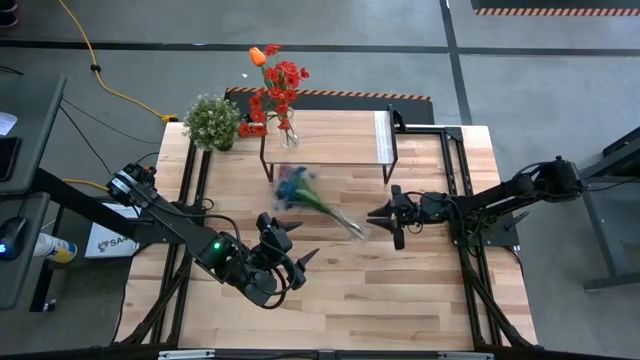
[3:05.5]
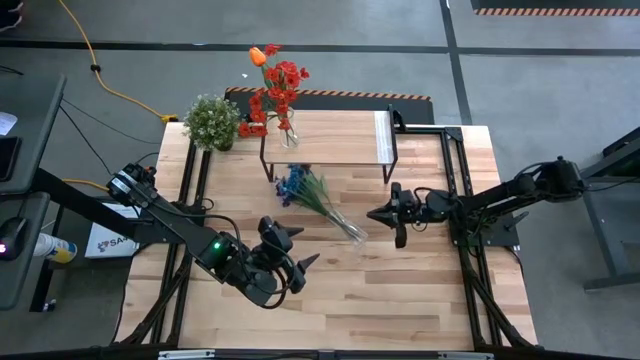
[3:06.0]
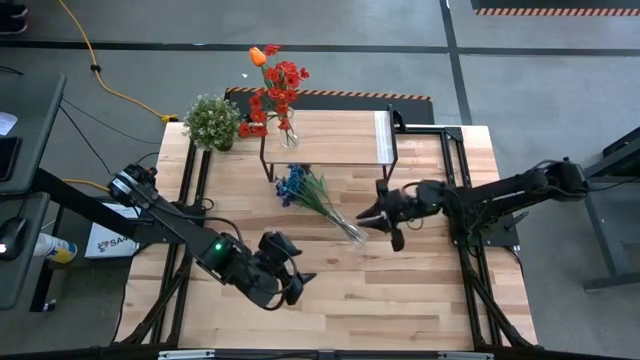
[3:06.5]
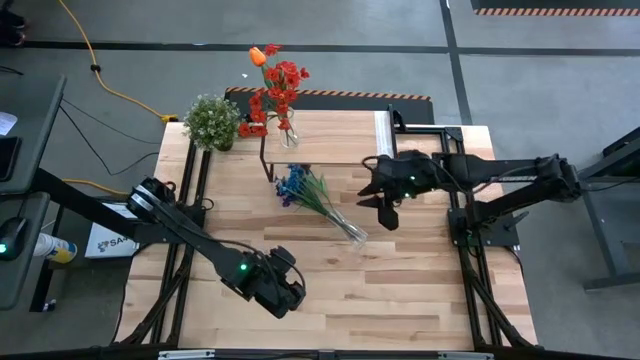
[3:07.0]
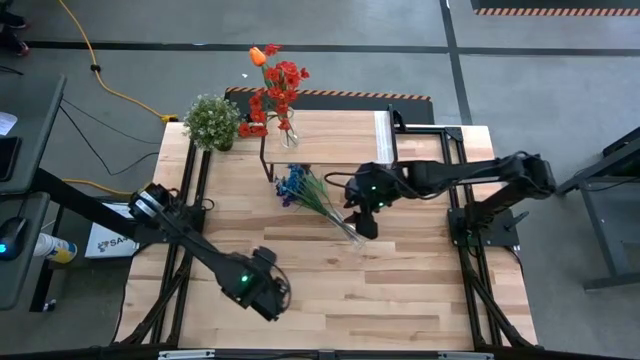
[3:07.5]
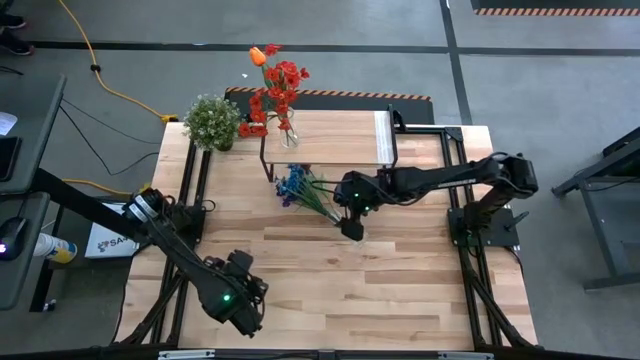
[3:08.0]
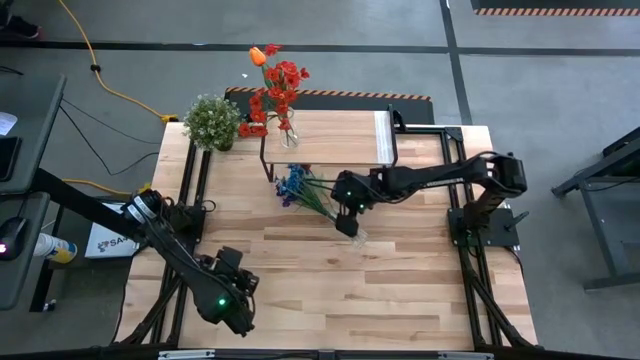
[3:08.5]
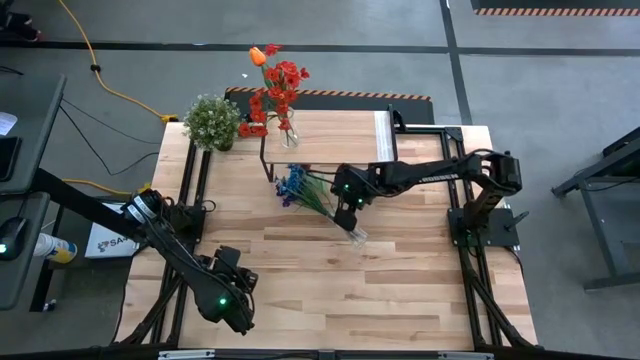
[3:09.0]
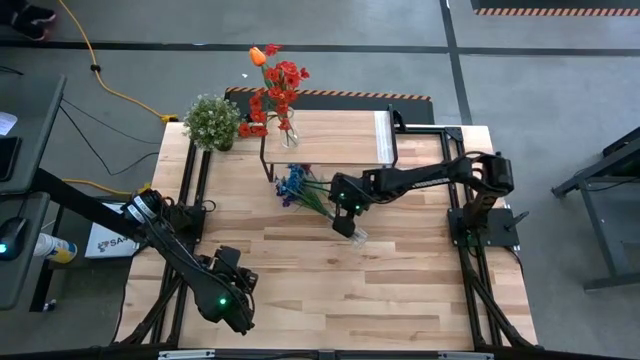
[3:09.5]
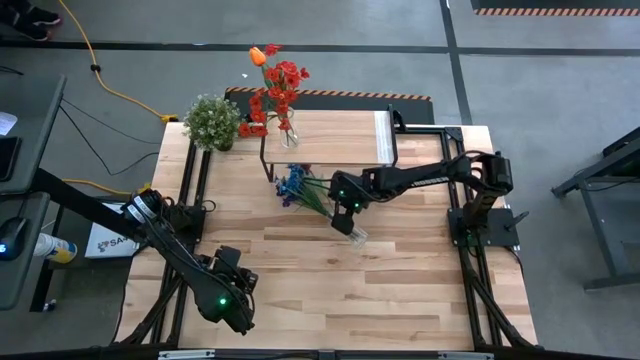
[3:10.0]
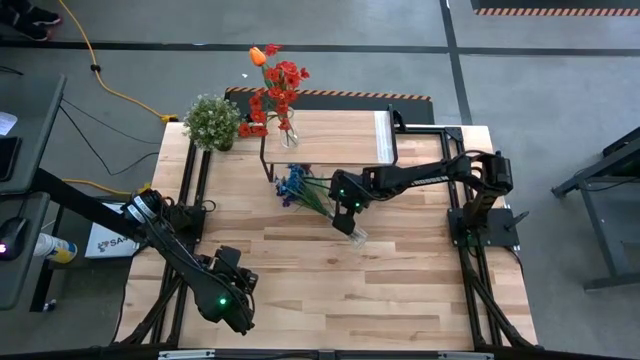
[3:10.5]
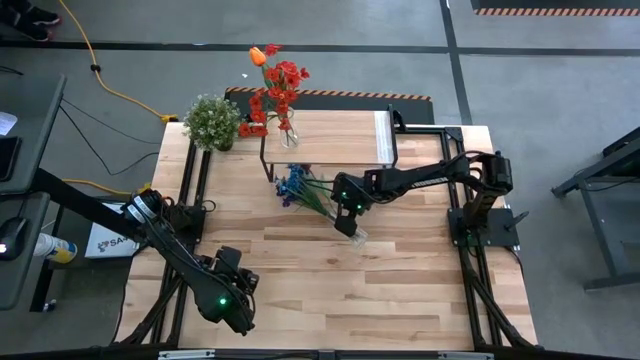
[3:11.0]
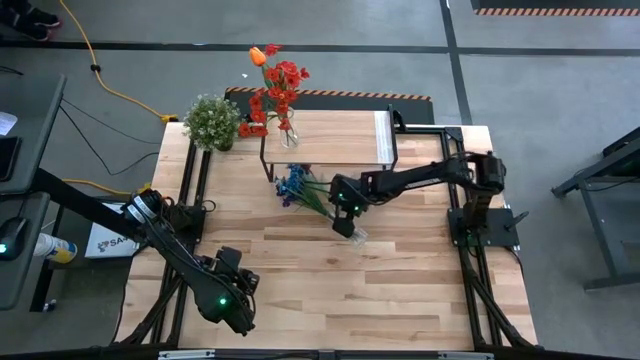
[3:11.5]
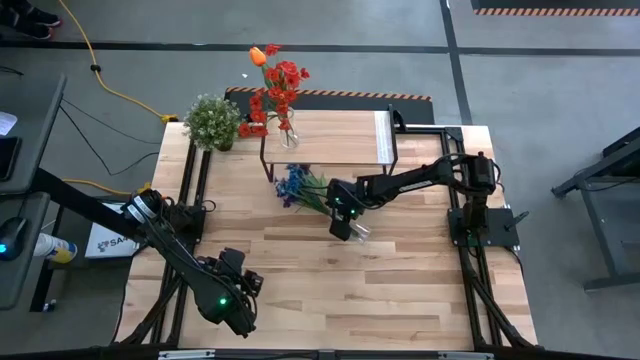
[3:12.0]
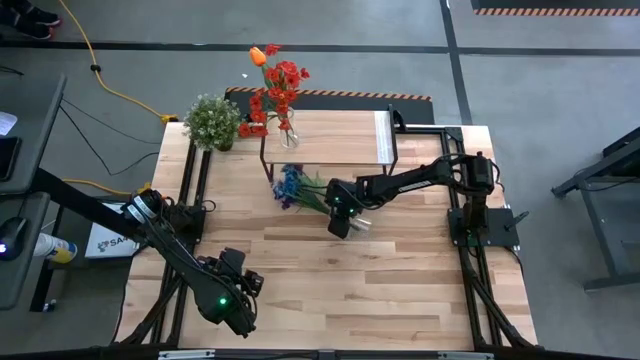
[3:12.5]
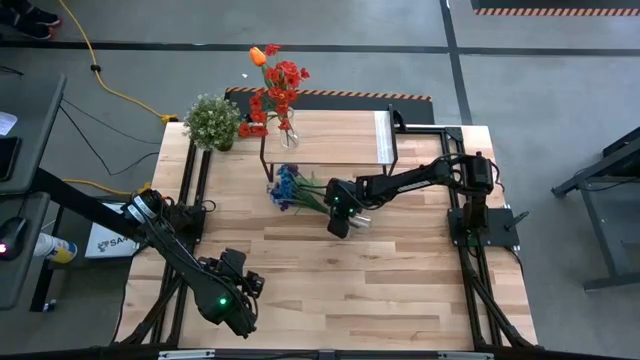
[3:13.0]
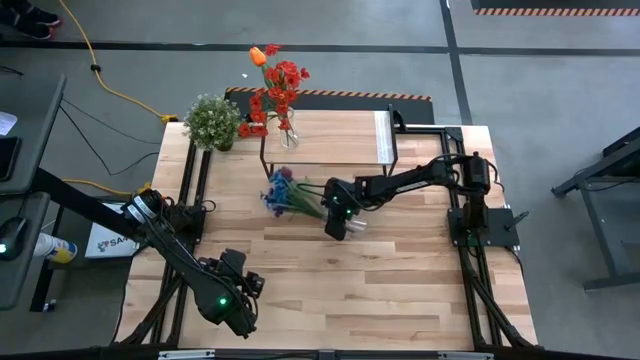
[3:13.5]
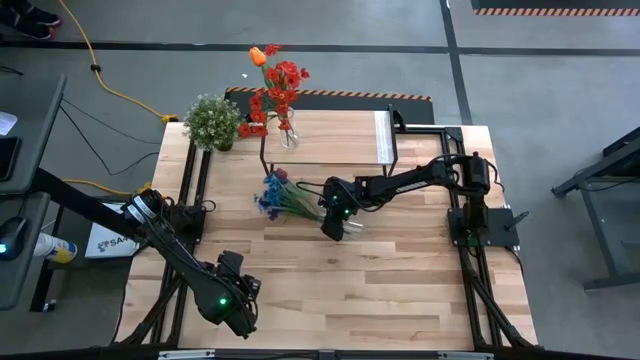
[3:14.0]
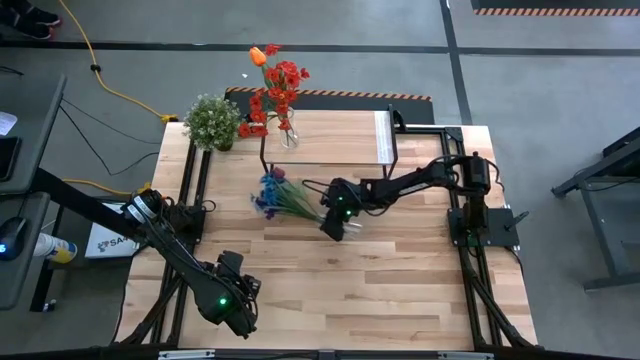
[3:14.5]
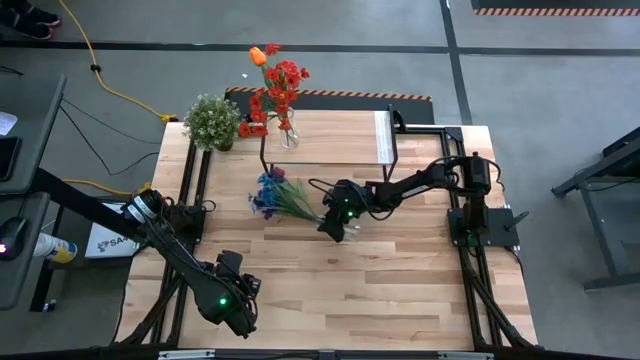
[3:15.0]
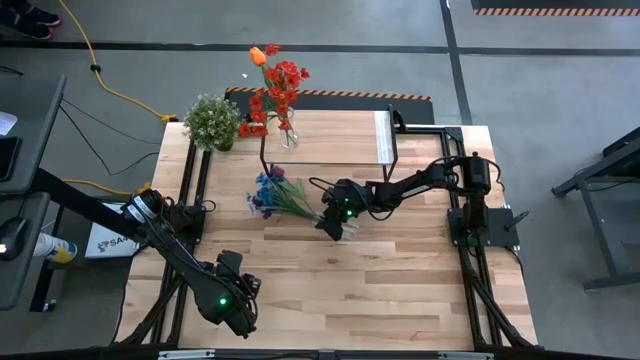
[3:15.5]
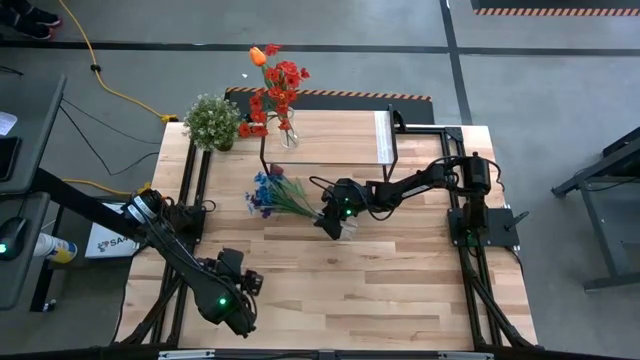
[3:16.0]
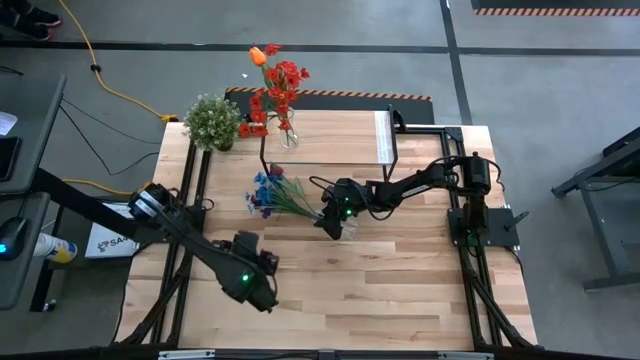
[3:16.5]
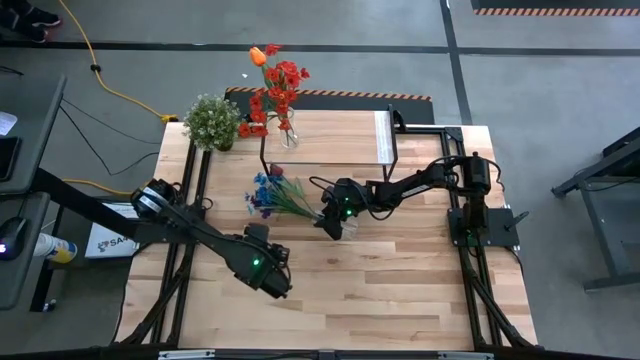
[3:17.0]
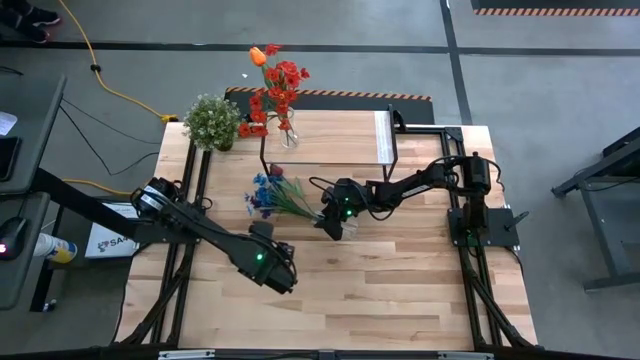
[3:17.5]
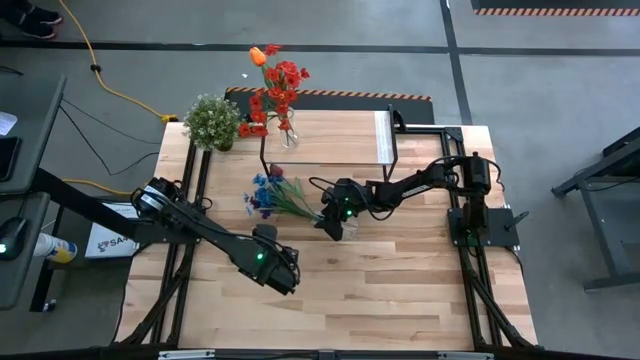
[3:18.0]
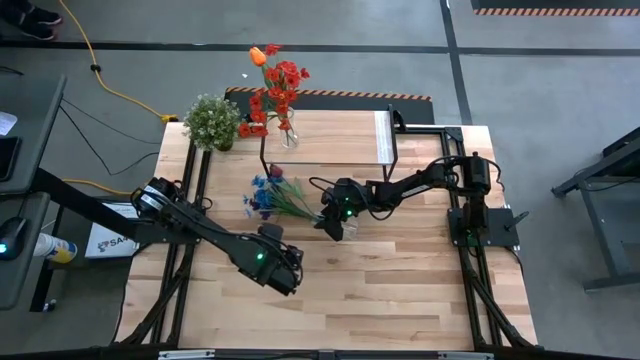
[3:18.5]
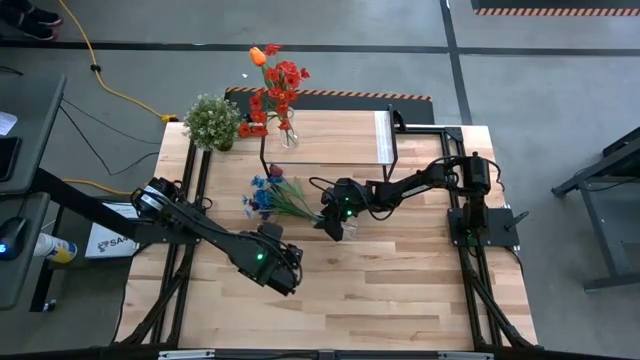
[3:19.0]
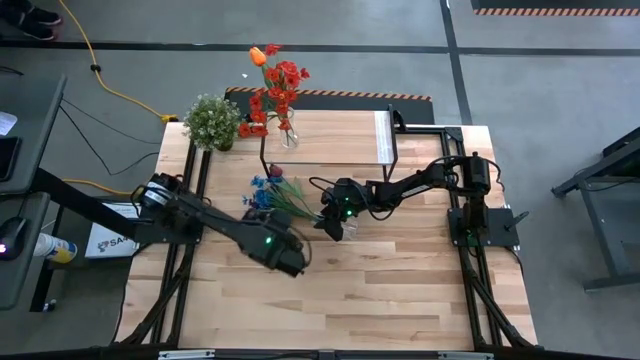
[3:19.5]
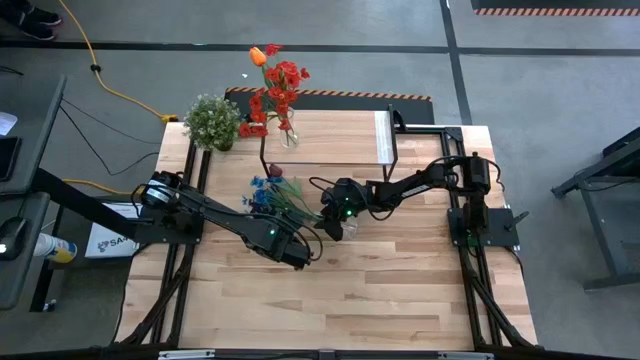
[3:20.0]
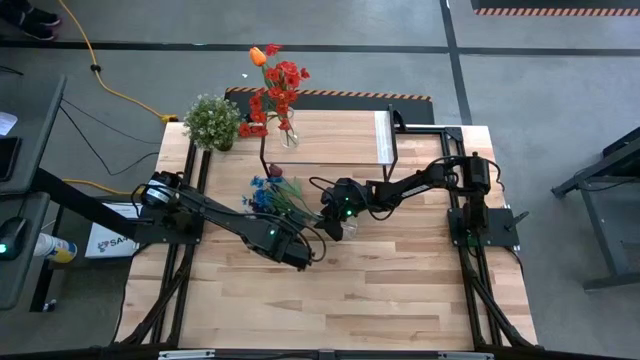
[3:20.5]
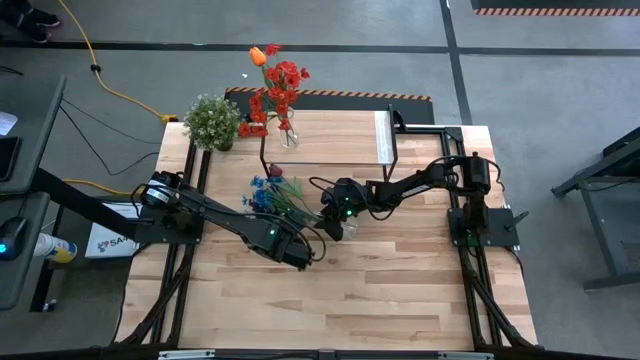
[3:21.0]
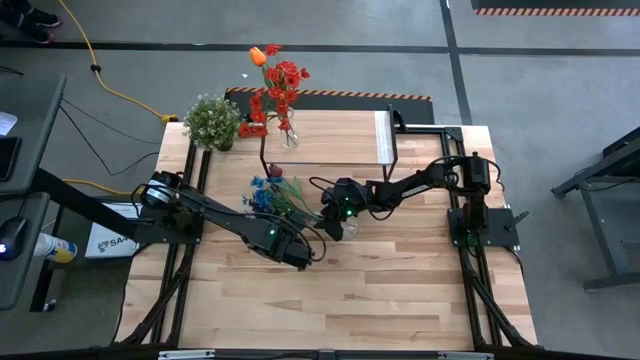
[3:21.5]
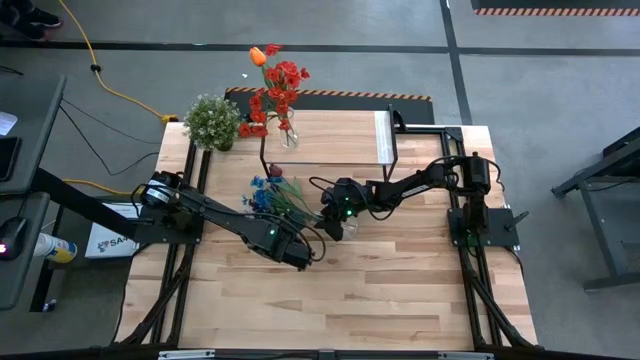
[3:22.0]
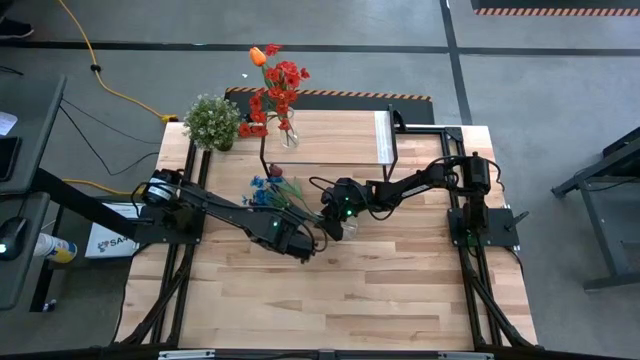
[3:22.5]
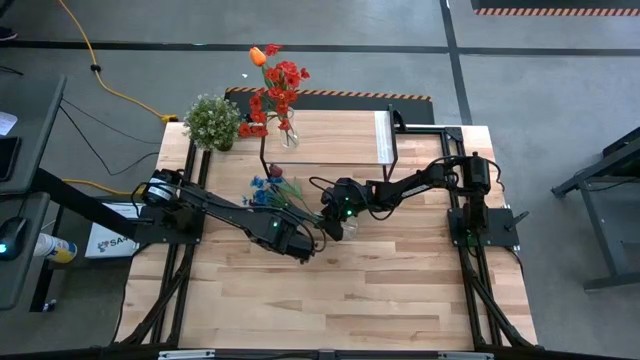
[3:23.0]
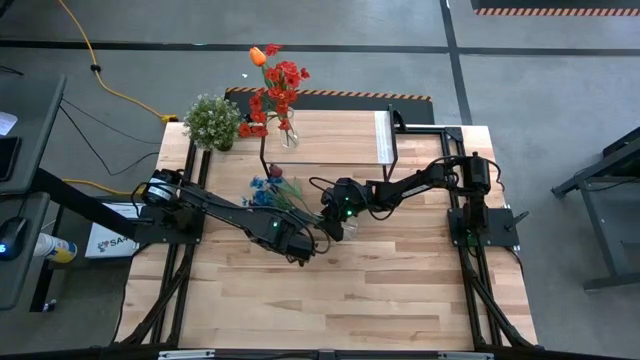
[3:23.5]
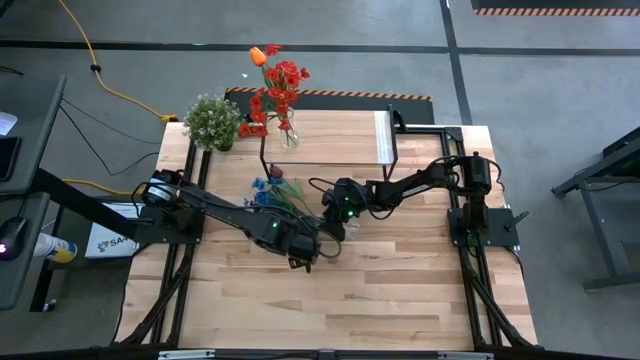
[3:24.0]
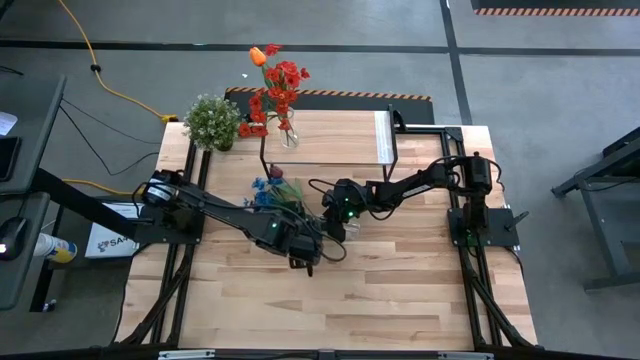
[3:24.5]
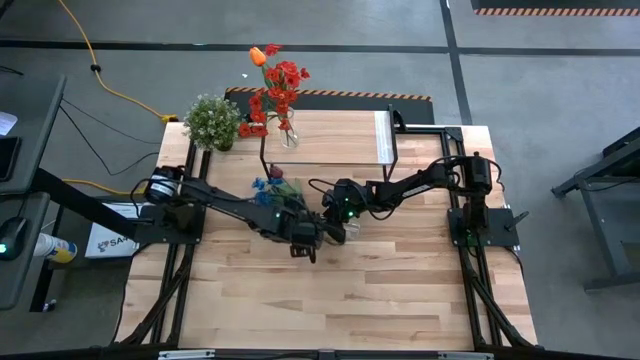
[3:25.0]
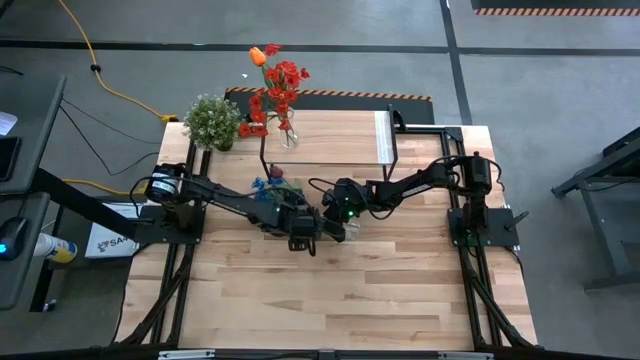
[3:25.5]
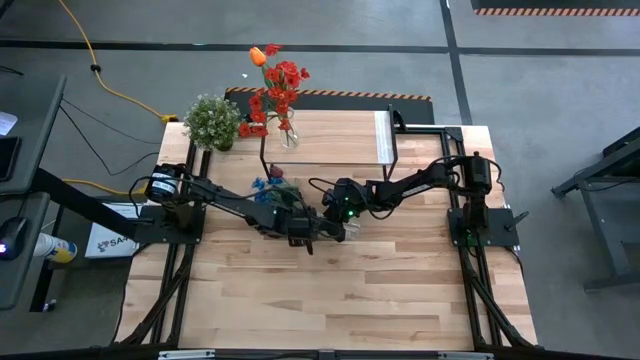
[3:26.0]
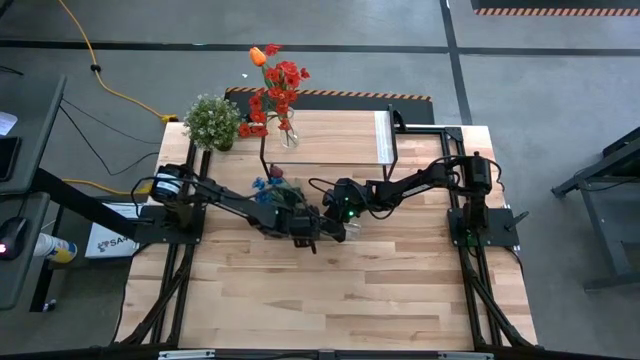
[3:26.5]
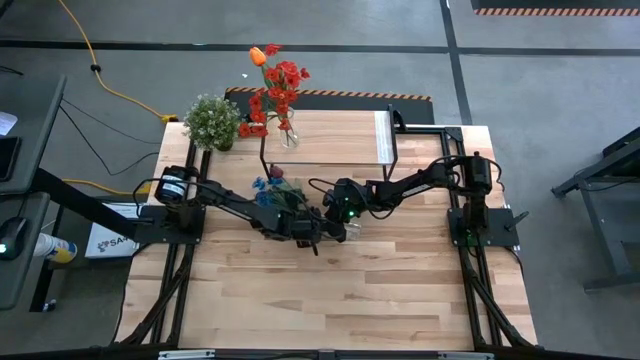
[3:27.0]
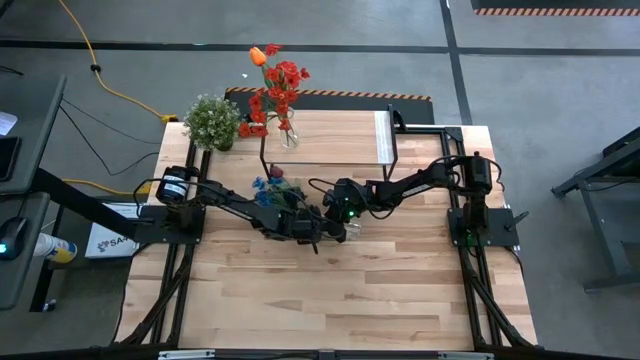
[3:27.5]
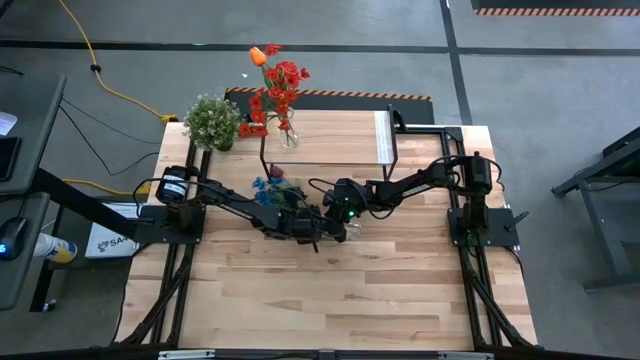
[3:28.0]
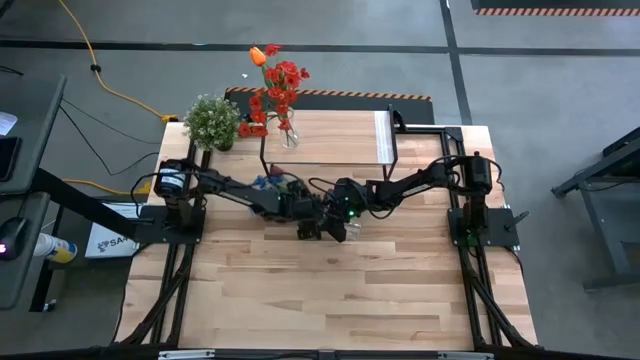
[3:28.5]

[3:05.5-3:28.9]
Task: Pick and place flowers into a vace then onto a shelf
Put the right transparent vase on the shelf
